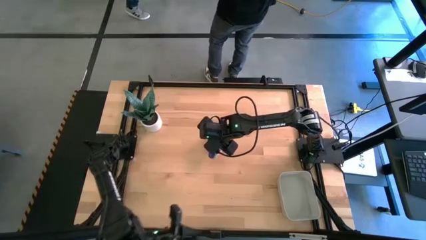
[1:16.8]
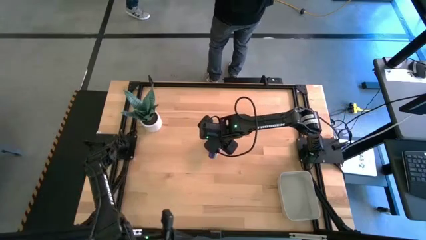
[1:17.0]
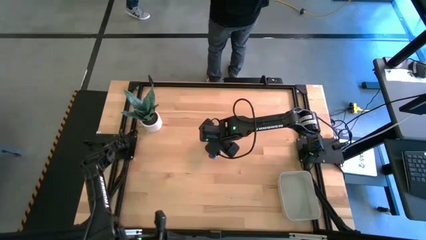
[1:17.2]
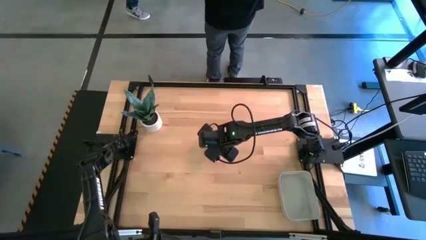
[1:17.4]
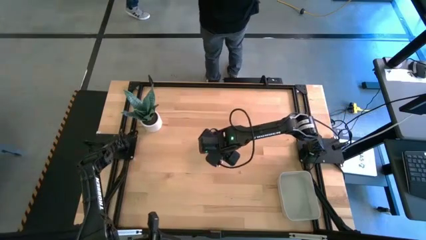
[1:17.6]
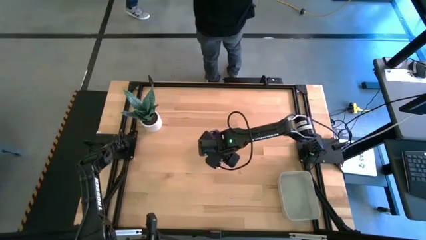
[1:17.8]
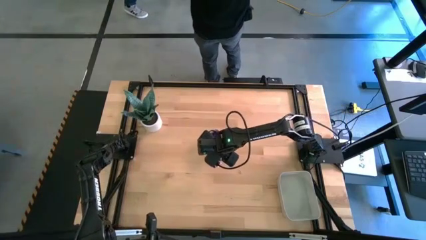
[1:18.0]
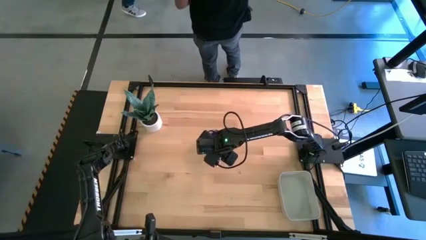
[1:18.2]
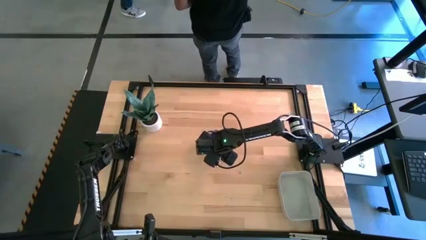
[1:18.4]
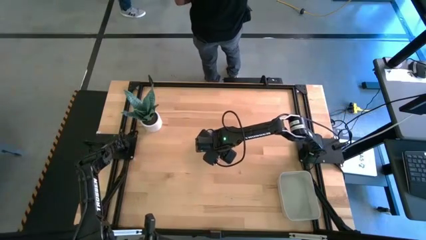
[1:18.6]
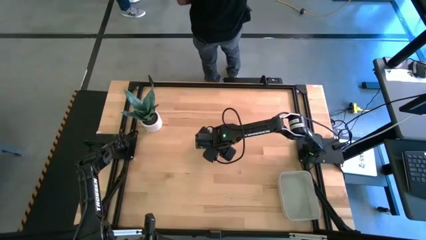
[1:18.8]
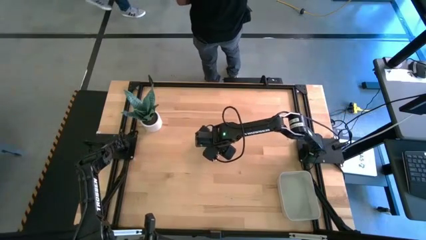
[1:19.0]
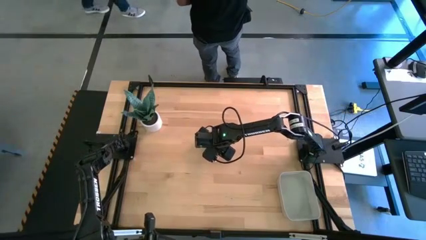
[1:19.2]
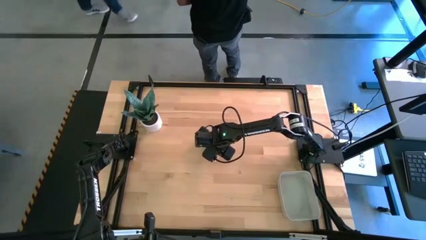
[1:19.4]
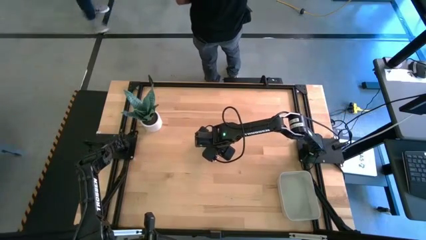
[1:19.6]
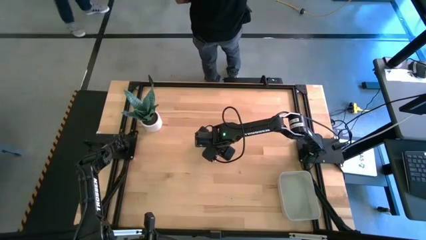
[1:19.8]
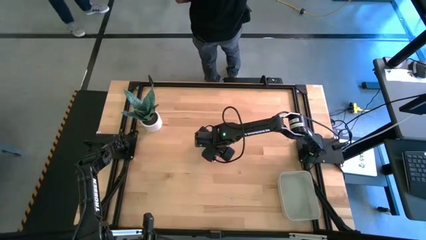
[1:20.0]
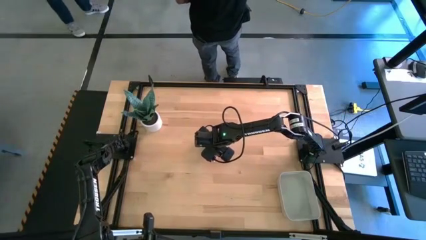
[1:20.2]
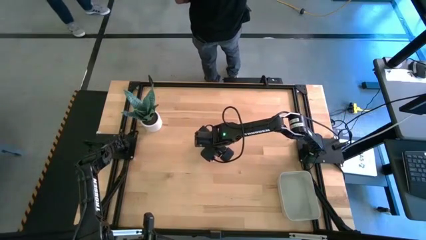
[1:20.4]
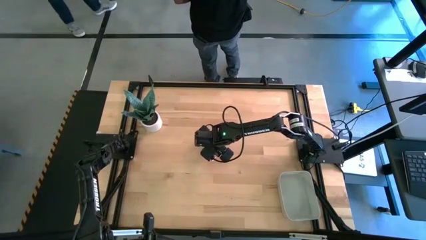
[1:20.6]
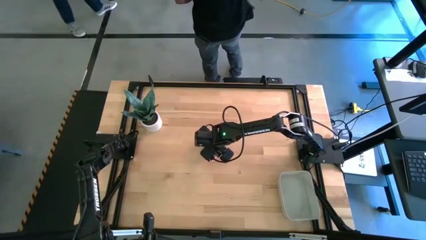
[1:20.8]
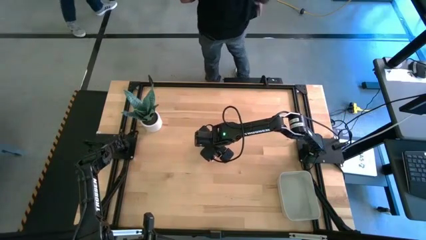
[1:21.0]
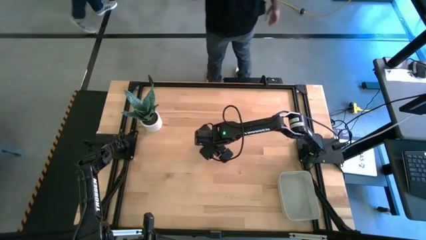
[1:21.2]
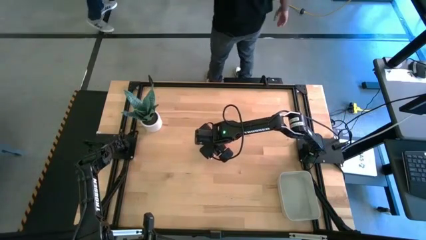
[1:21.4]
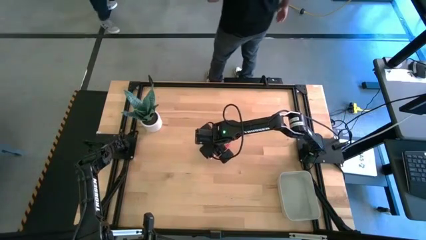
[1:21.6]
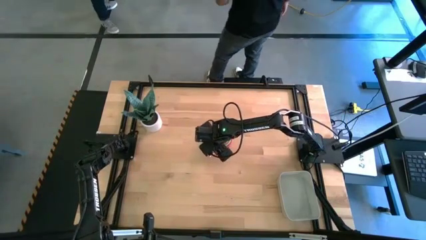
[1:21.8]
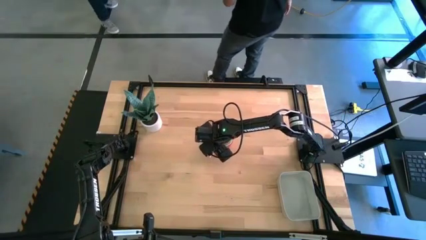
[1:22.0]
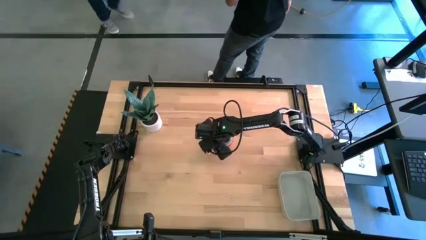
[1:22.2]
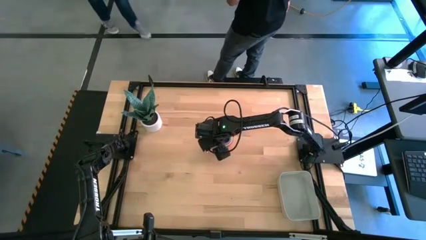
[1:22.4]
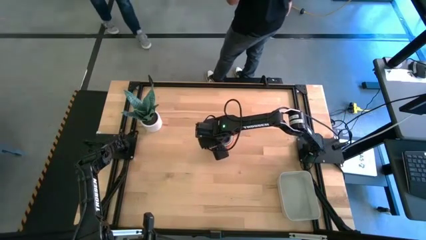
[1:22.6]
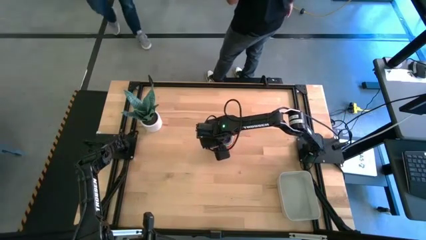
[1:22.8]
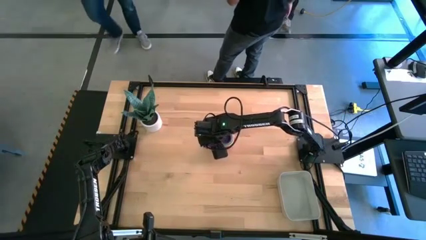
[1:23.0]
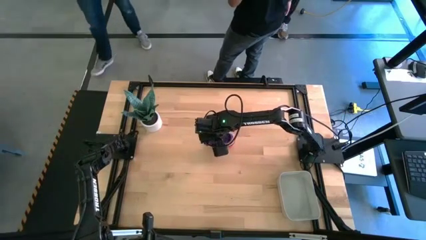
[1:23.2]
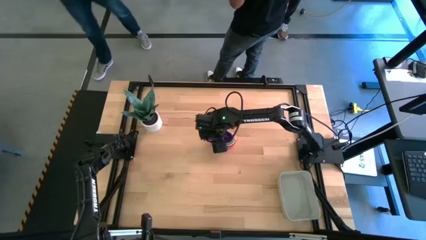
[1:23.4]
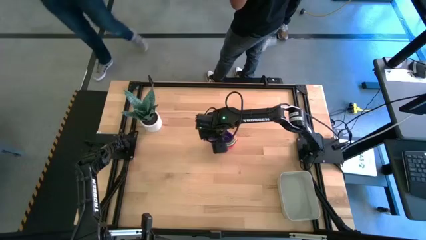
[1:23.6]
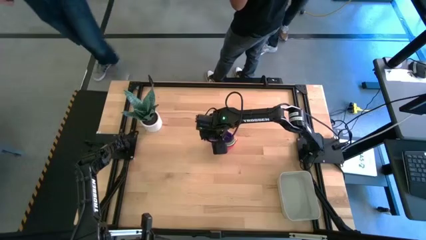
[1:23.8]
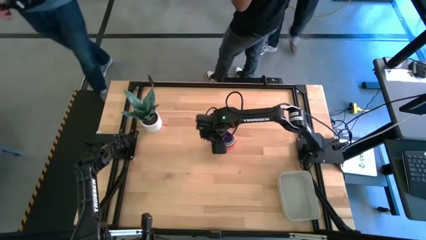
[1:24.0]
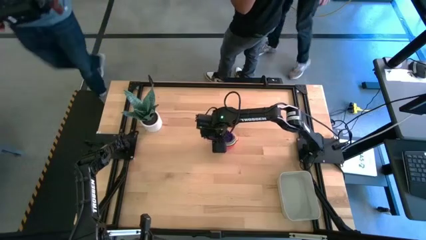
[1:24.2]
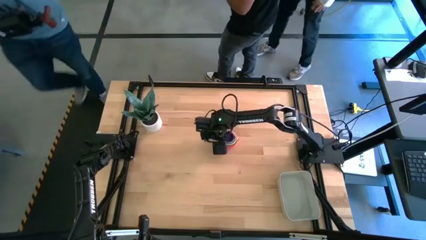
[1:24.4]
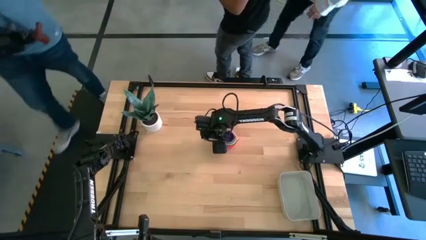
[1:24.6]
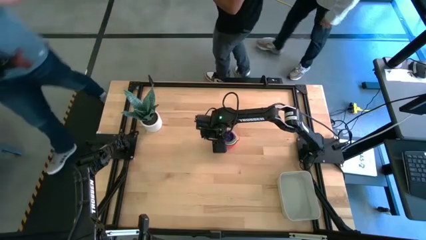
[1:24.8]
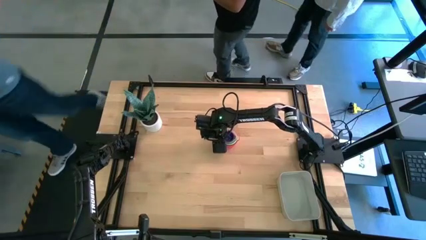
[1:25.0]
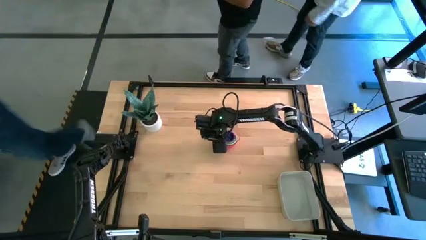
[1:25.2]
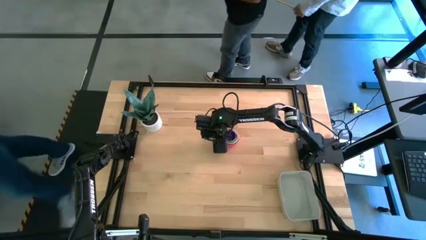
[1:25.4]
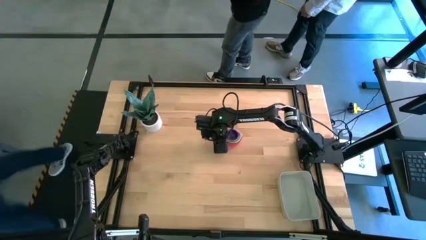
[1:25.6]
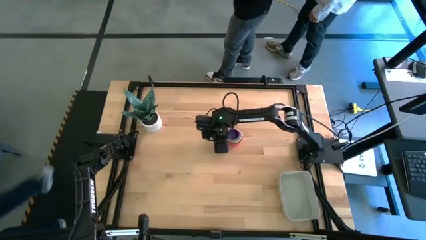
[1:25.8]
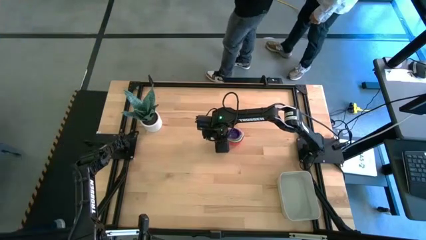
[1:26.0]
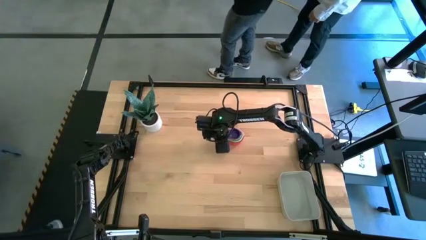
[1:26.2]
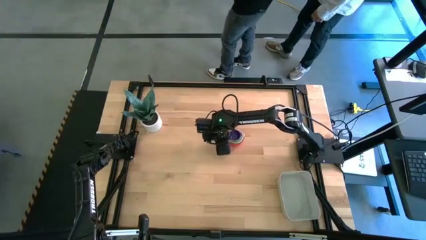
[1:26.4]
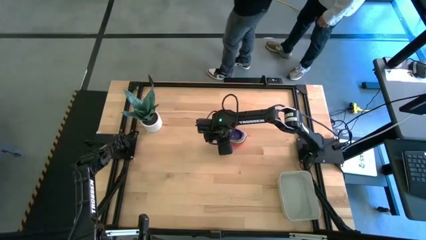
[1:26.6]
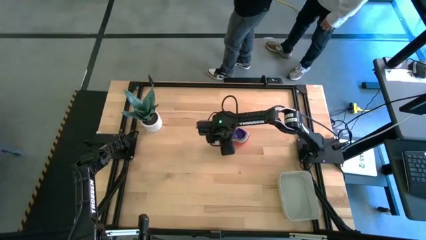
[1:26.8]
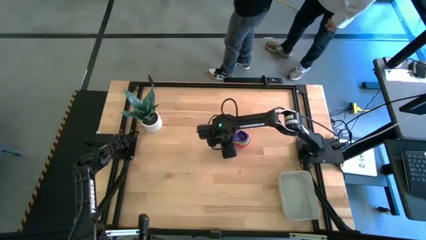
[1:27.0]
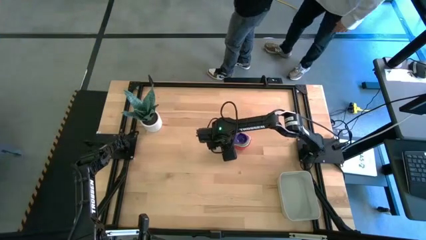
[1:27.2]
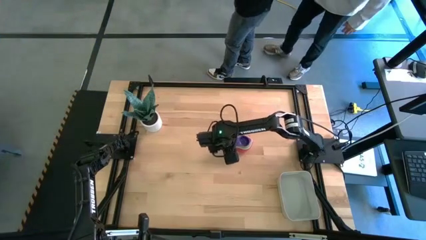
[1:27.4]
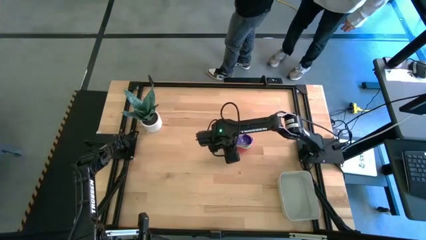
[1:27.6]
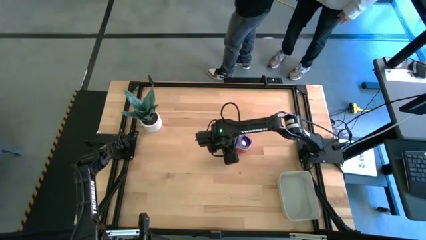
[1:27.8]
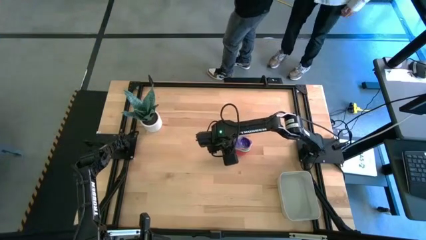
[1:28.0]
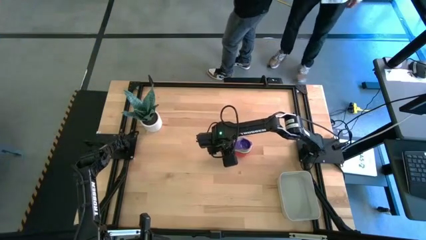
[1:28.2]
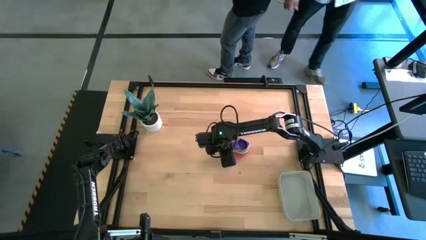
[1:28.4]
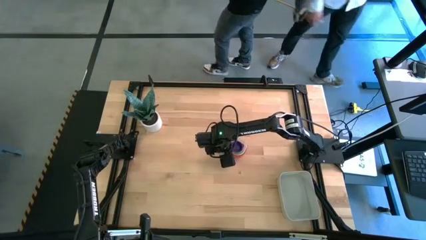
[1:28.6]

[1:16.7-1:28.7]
Task: Nest measuring cups in basket
Put the stacked colored measuring cups into the gray bin

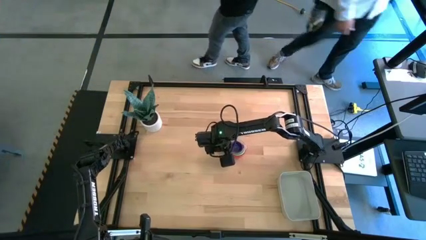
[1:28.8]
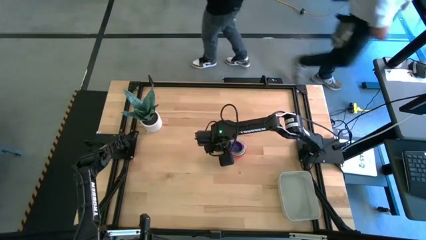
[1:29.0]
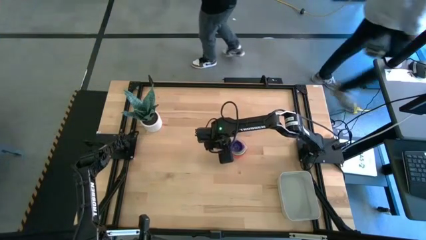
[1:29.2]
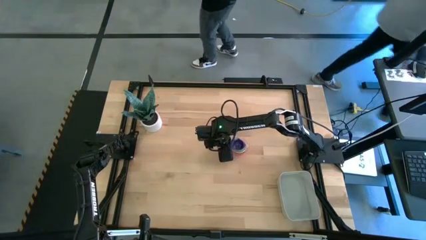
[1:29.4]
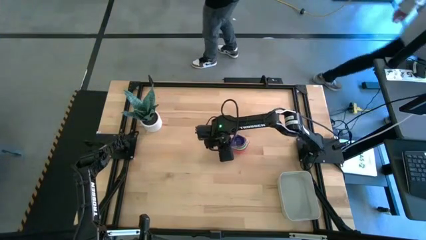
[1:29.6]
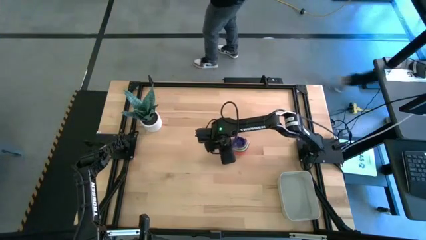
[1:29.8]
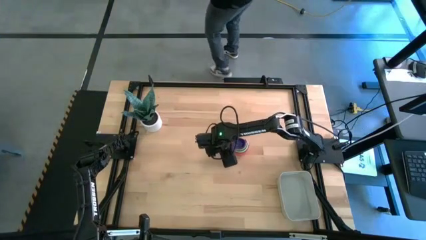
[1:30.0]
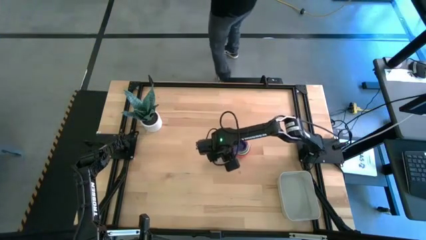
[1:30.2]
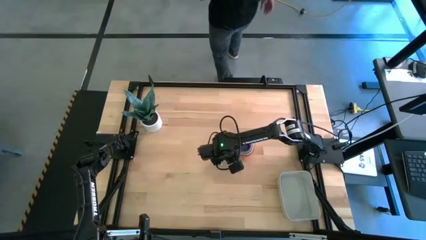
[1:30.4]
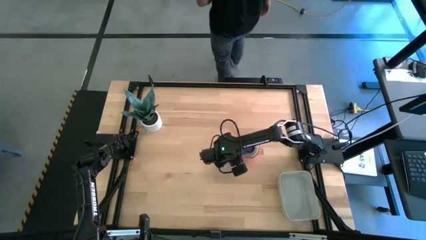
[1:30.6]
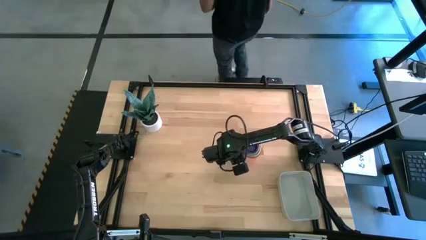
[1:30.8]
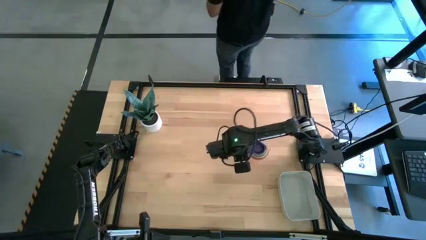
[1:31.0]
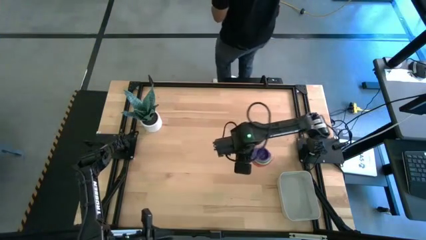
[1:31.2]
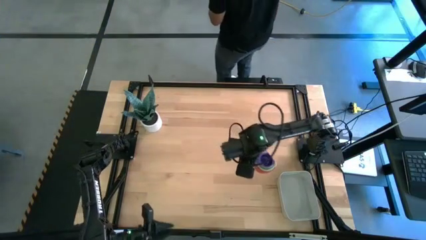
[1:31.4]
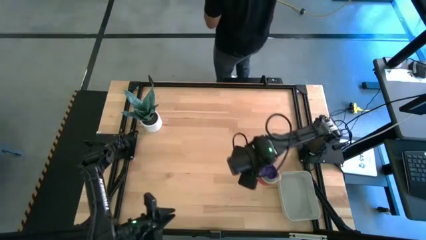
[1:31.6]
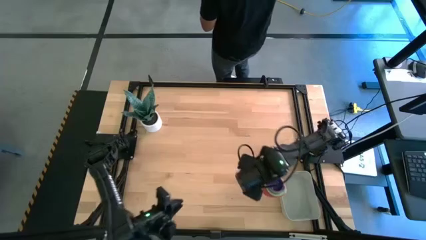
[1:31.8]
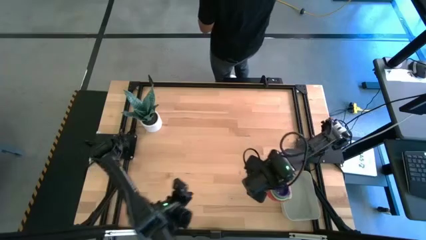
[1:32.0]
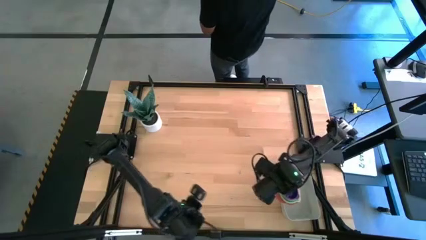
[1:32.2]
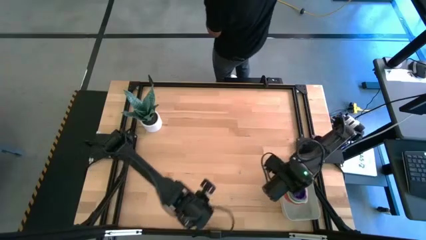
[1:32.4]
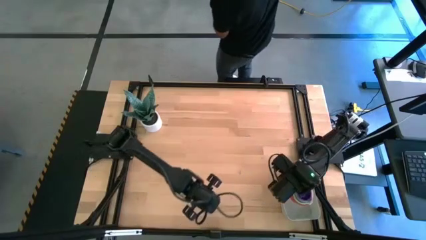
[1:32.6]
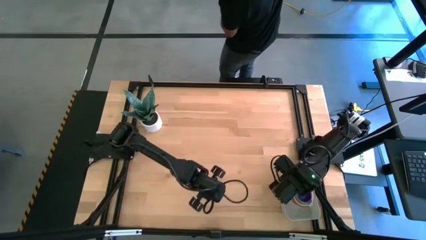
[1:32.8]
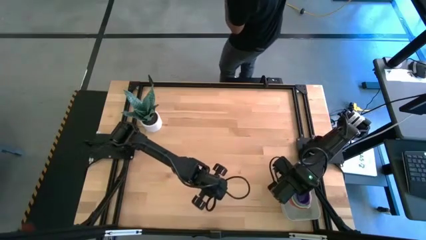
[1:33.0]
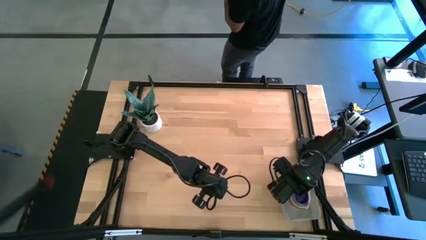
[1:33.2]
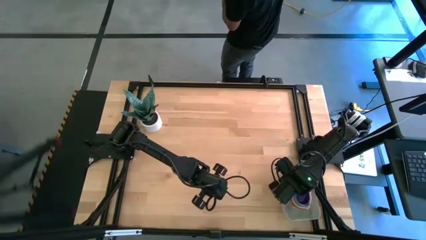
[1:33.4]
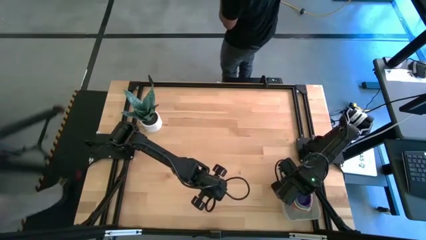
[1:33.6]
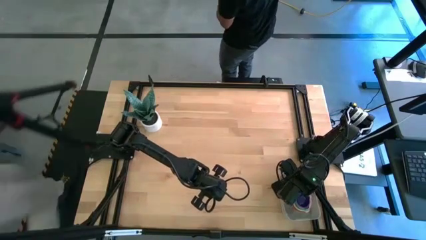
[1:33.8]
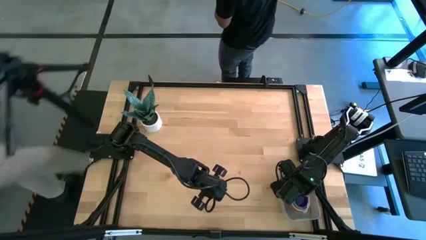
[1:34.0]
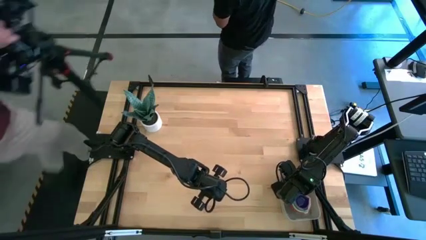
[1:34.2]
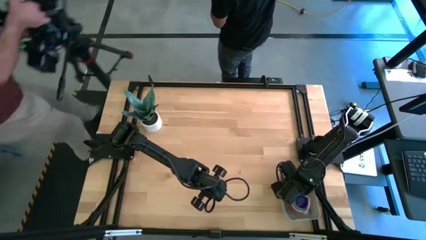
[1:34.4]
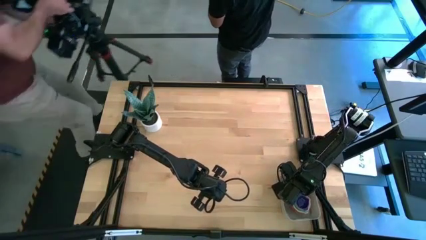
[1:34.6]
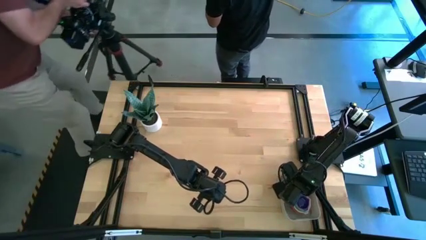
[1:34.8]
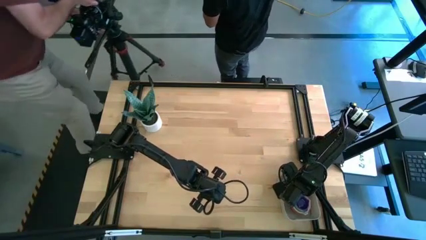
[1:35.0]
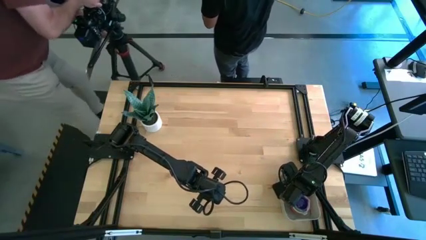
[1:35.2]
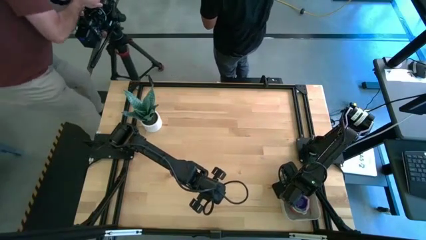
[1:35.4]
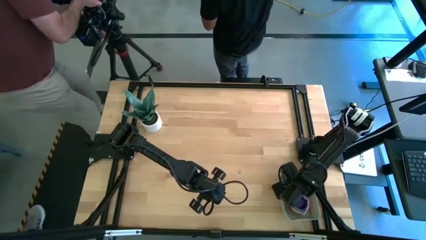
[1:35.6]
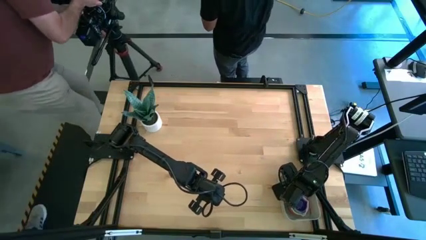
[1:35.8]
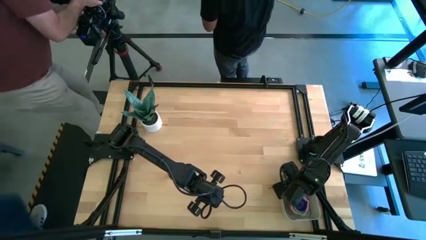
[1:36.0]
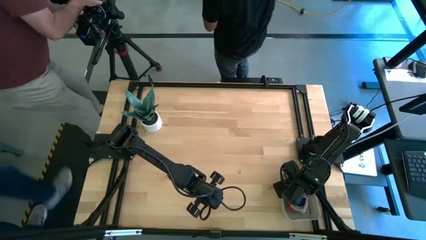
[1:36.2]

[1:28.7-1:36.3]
Put the stacked colored measuring cups into the gray bin
